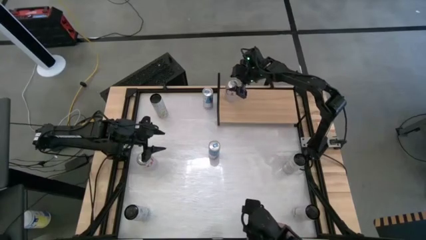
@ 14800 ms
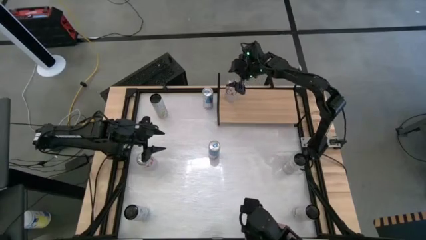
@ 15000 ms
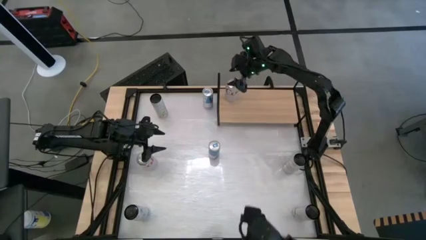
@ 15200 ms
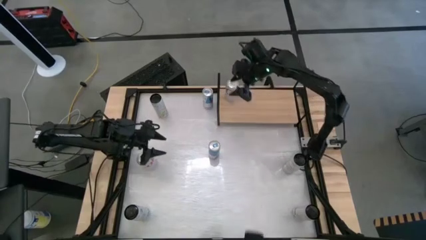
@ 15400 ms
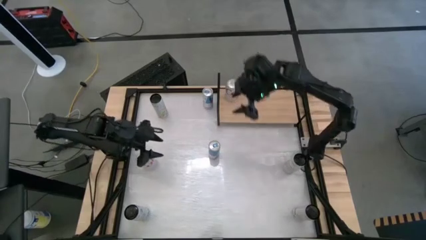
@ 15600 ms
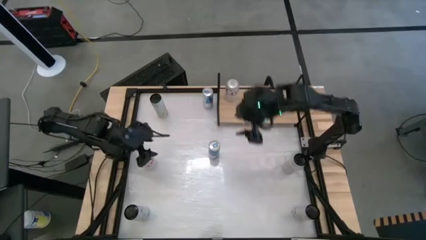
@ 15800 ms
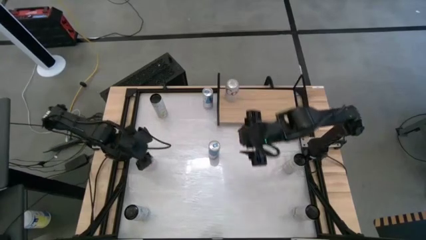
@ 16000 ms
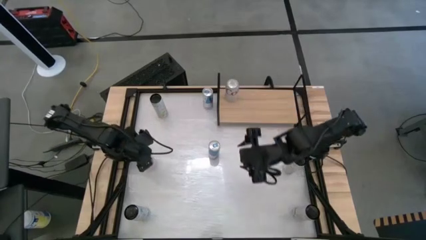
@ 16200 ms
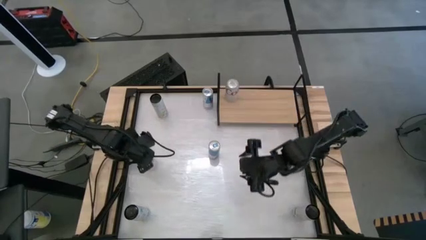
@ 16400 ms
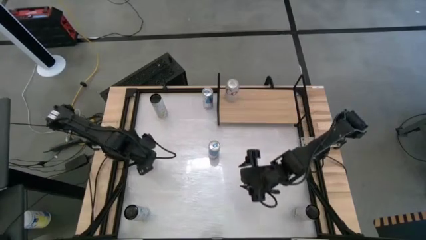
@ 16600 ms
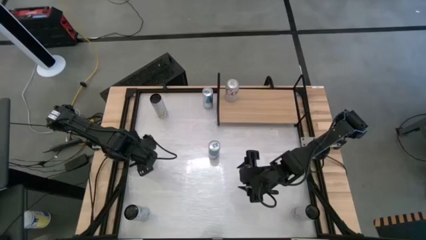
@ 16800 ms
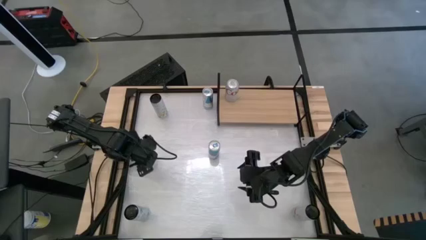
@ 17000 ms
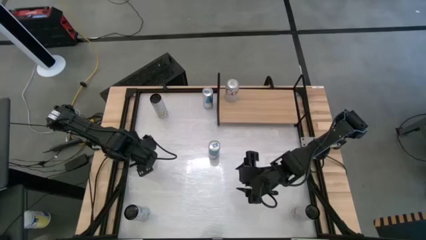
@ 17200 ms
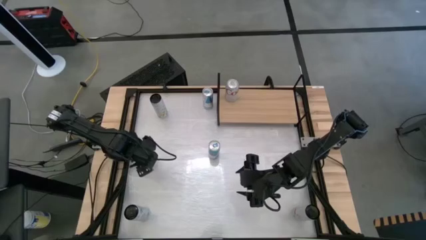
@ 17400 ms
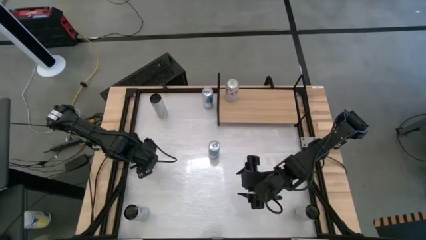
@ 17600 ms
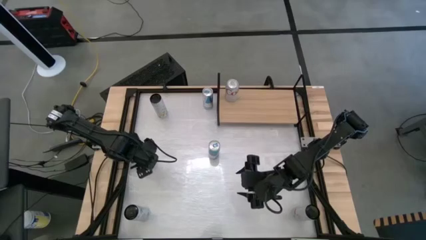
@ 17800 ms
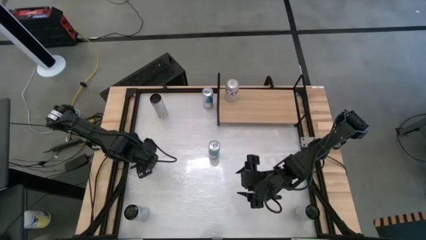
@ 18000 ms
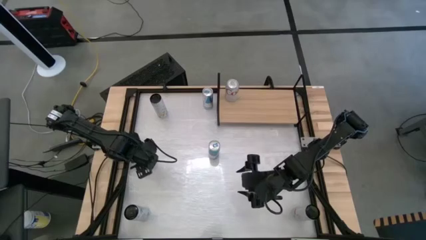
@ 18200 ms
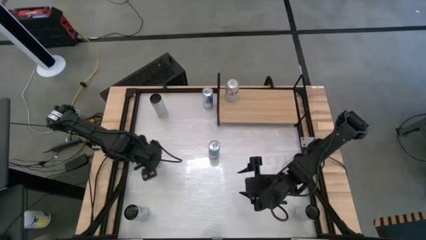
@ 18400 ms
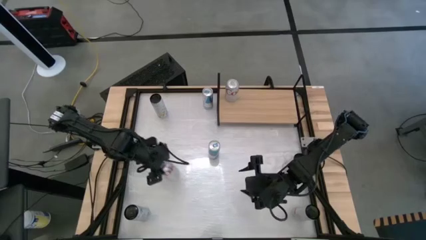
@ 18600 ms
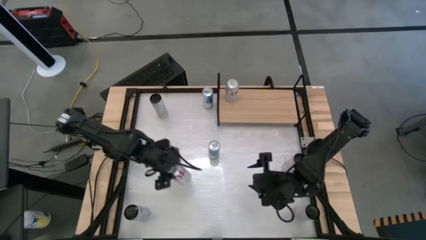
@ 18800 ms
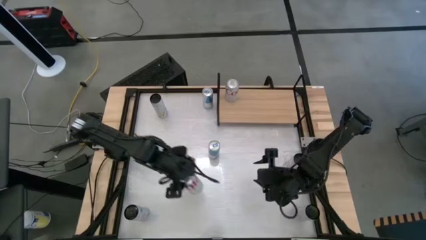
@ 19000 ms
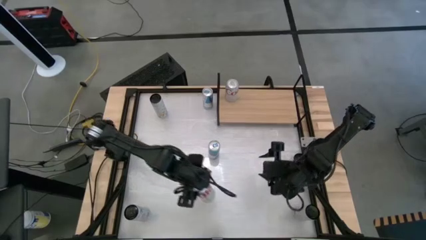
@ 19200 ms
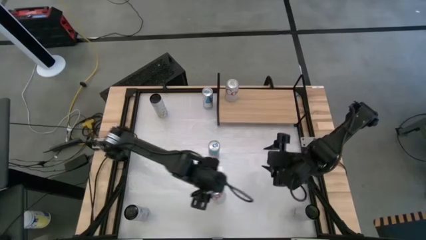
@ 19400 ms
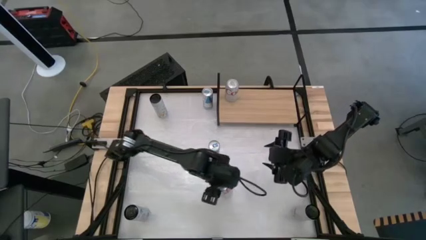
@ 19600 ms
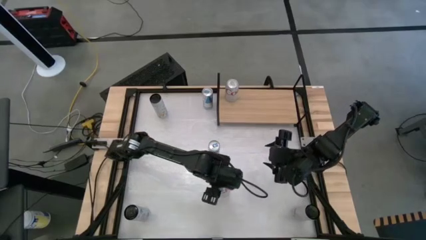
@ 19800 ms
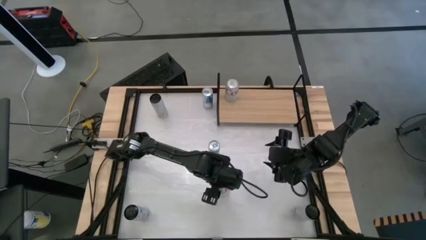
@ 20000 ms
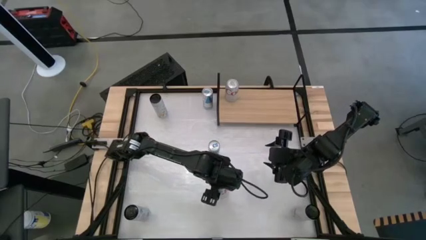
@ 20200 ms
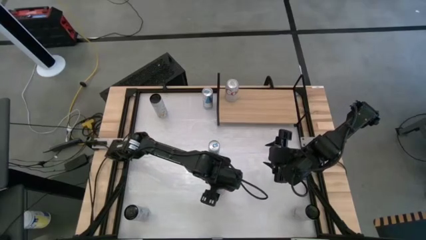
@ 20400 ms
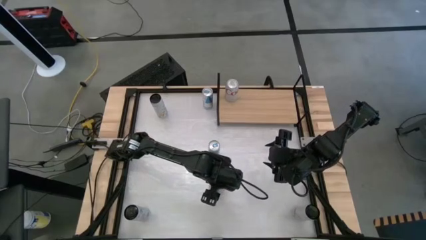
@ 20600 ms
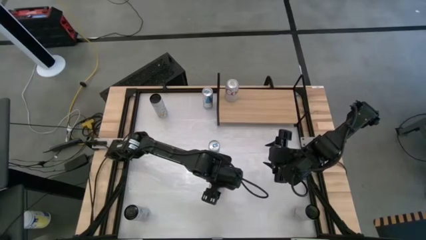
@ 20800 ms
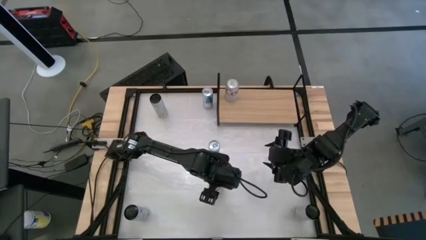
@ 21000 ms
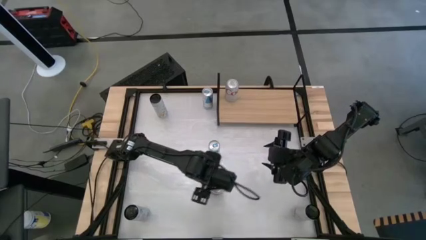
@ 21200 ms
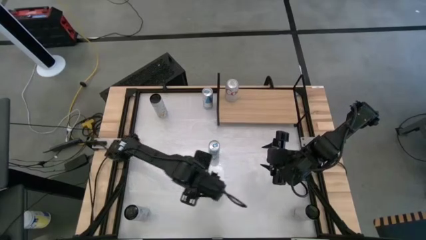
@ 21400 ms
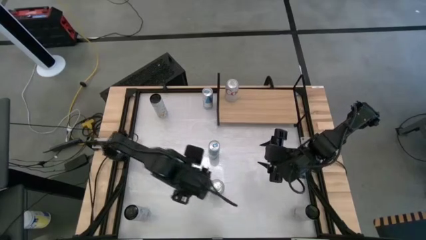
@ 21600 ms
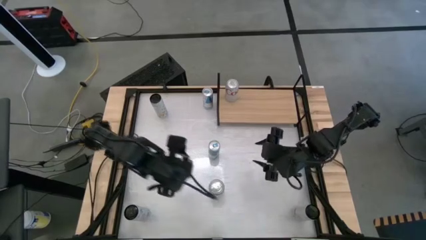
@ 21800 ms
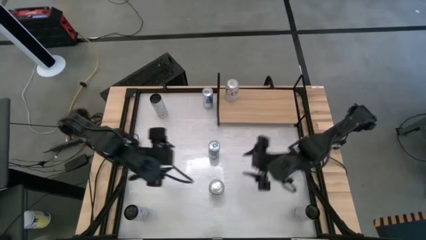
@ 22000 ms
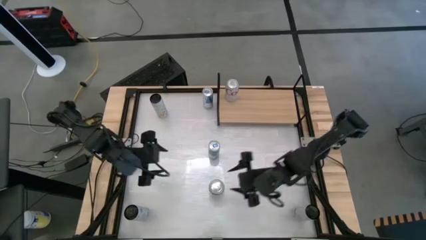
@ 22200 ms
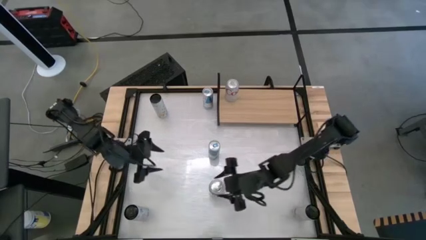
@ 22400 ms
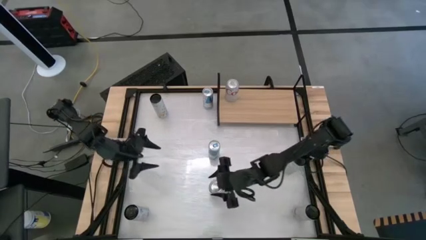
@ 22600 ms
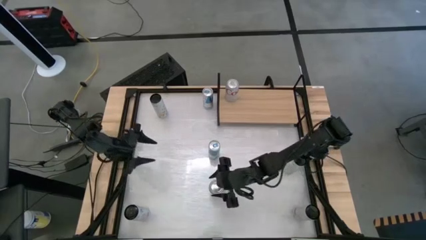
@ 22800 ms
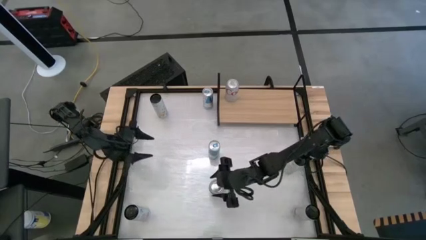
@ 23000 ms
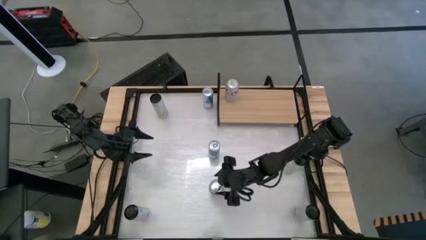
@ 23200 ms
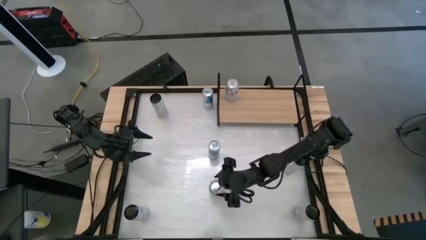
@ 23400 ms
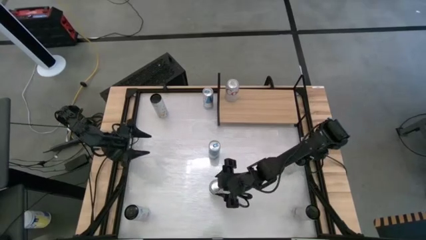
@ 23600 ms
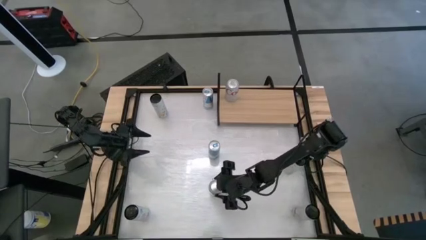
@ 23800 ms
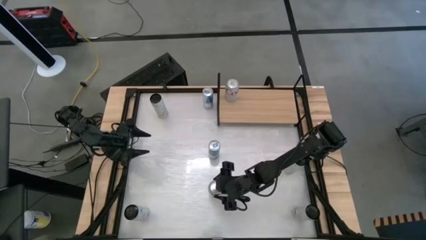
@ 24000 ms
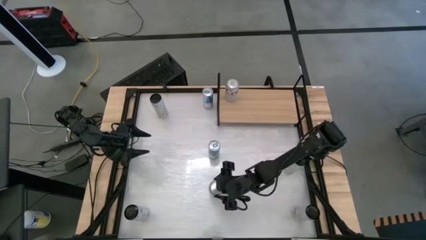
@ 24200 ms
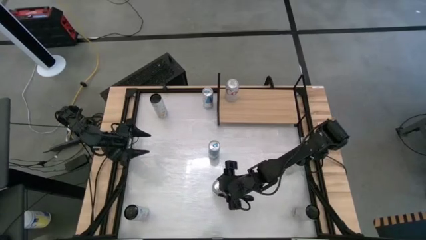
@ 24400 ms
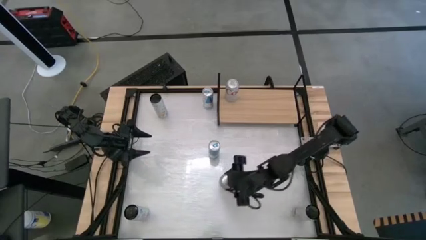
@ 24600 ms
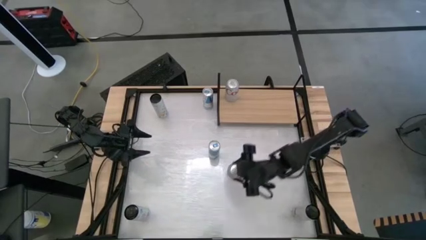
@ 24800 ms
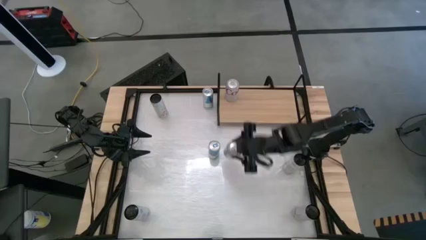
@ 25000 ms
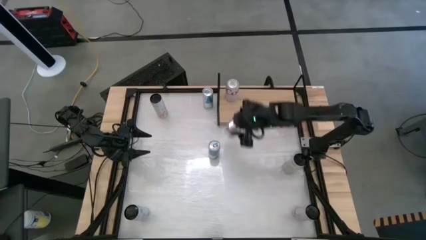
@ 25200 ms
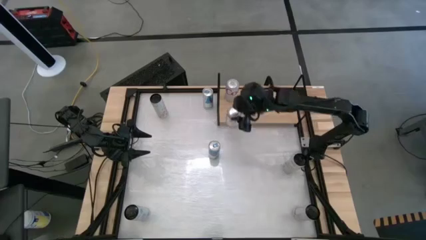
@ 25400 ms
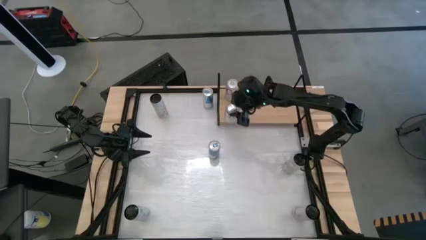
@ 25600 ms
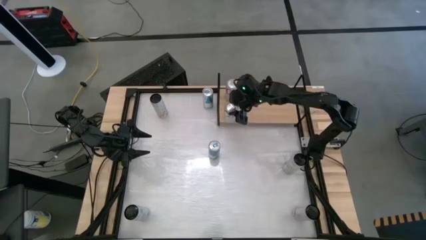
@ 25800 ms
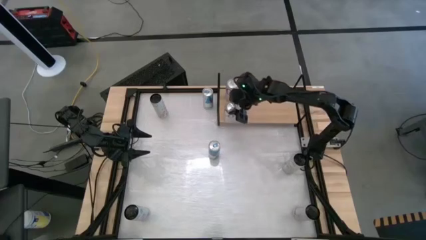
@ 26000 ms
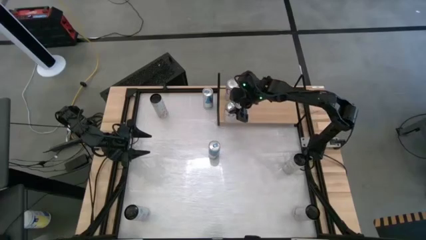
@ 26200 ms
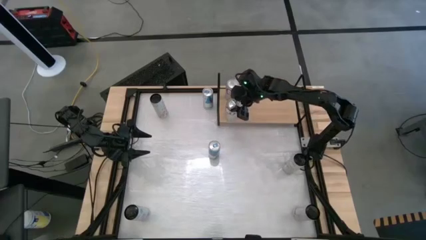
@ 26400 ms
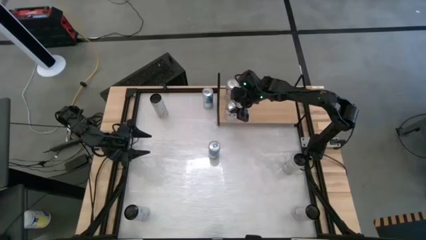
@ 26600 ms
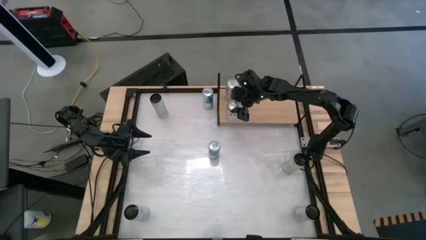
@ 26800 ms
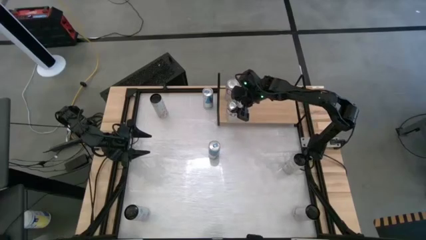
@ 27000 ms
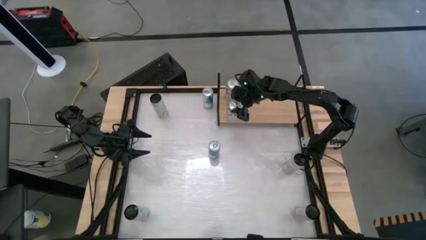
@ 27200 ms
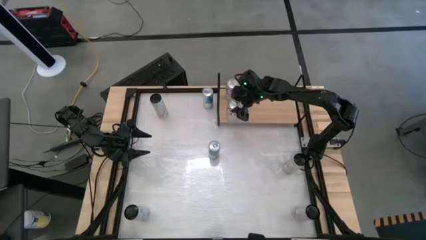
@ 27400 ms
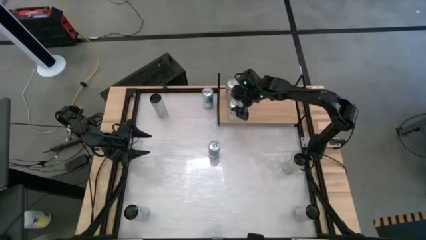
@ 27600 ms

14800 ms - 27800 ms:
Task: Place canned beverage on shelf
Put the silver can on the shelf
